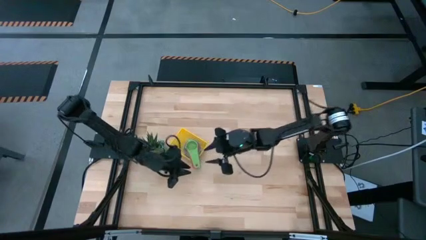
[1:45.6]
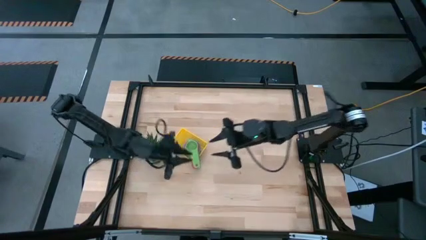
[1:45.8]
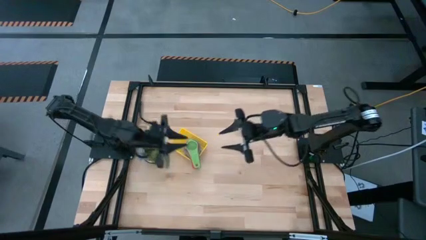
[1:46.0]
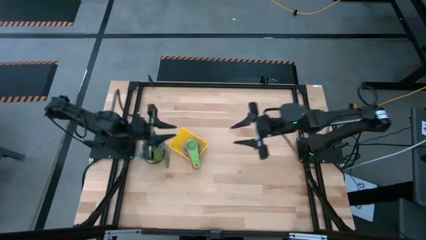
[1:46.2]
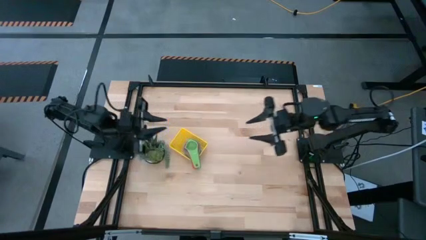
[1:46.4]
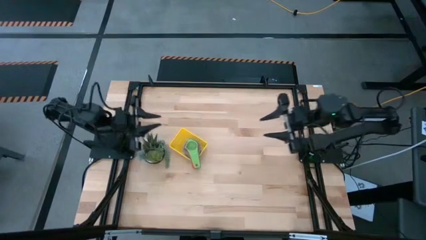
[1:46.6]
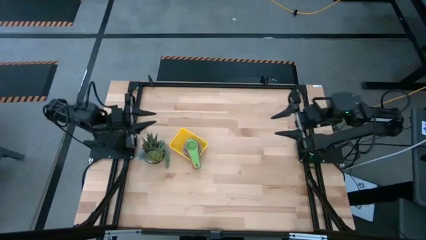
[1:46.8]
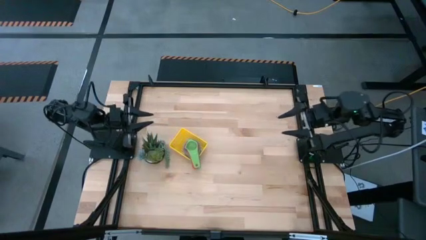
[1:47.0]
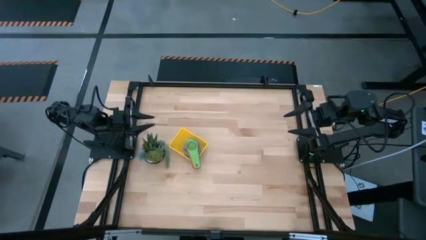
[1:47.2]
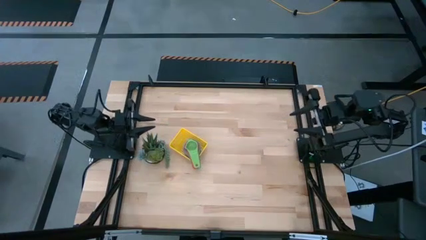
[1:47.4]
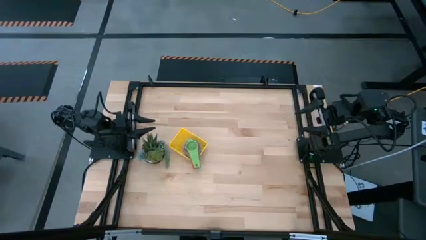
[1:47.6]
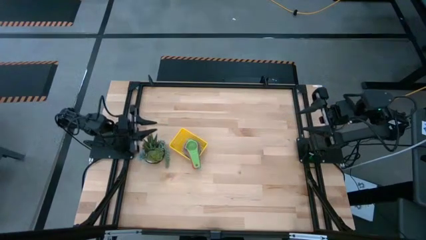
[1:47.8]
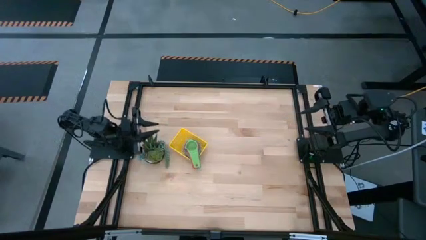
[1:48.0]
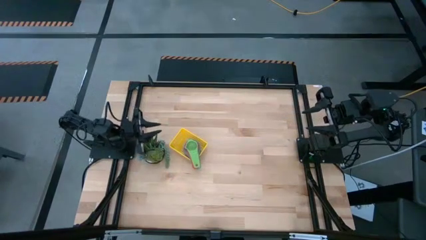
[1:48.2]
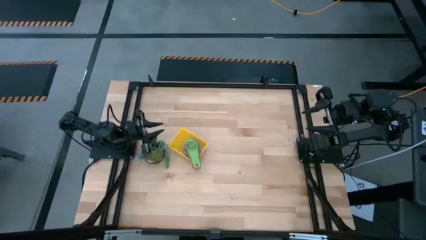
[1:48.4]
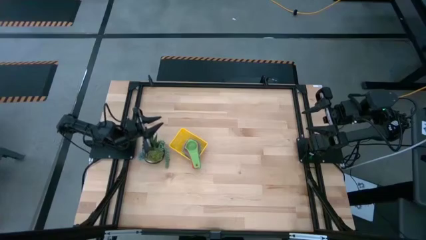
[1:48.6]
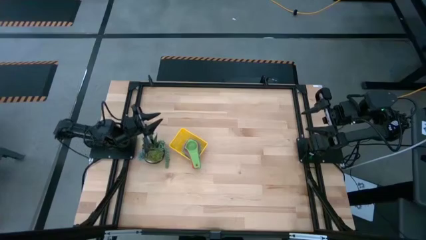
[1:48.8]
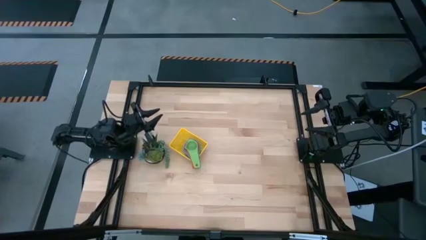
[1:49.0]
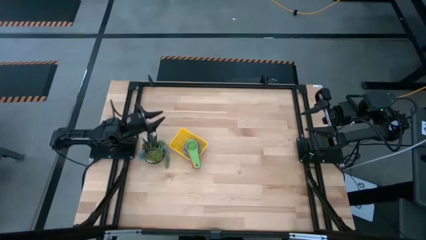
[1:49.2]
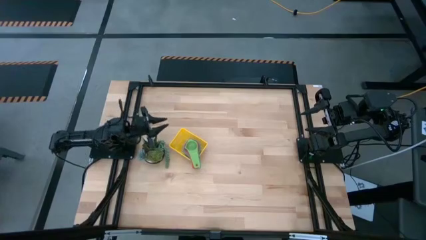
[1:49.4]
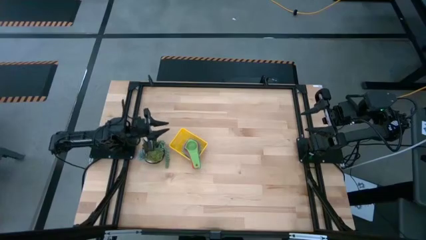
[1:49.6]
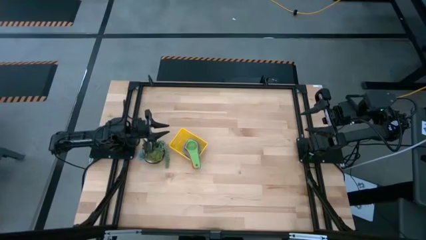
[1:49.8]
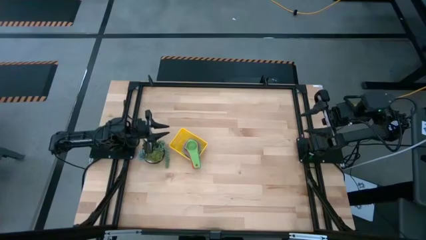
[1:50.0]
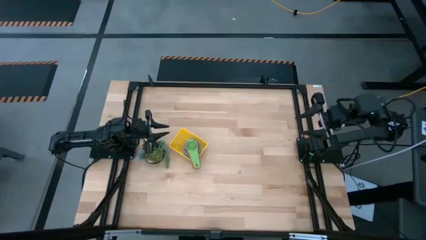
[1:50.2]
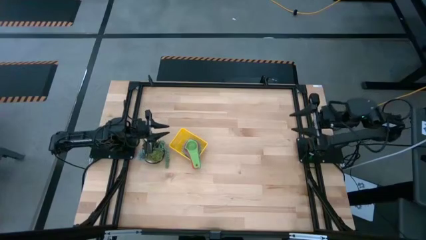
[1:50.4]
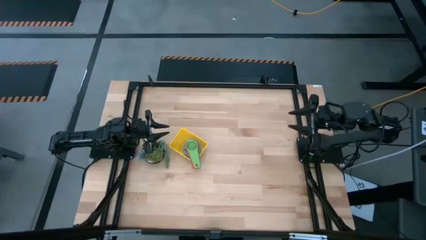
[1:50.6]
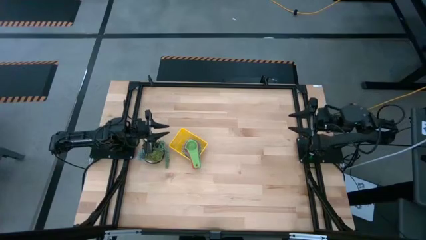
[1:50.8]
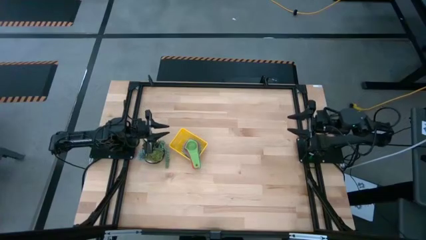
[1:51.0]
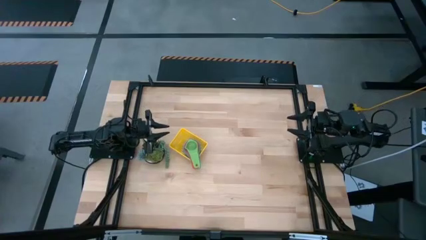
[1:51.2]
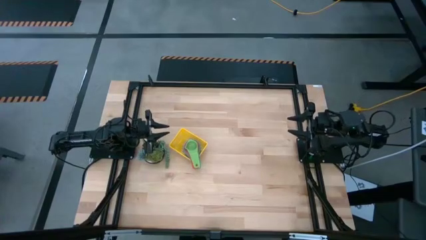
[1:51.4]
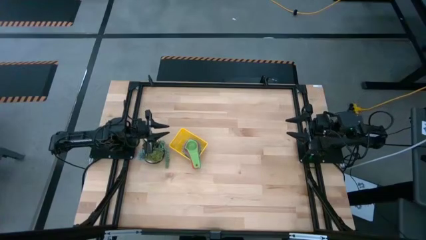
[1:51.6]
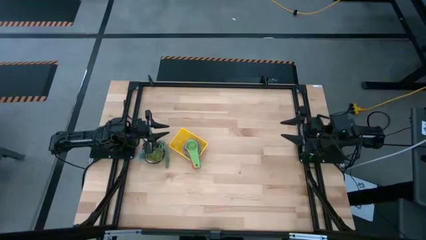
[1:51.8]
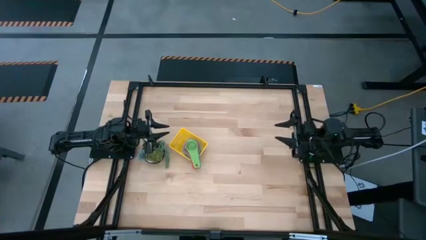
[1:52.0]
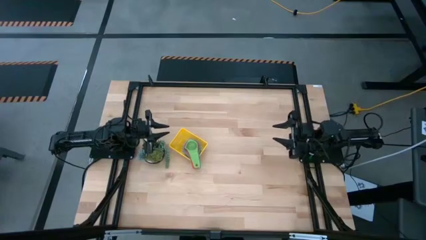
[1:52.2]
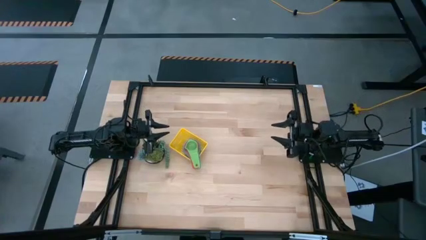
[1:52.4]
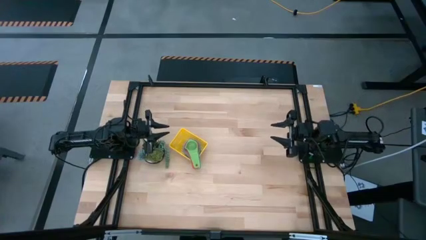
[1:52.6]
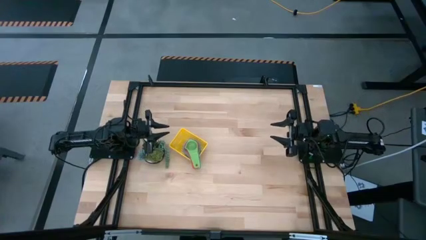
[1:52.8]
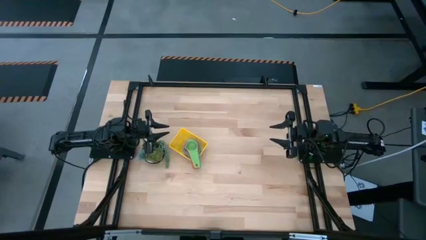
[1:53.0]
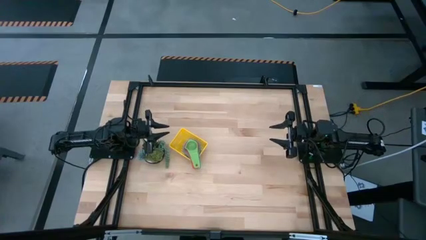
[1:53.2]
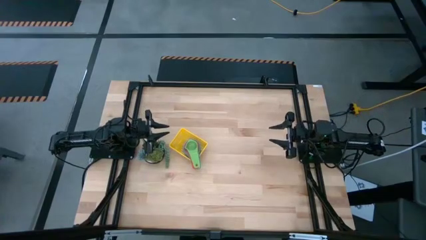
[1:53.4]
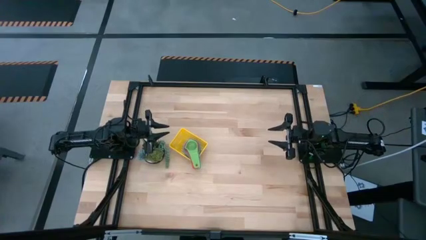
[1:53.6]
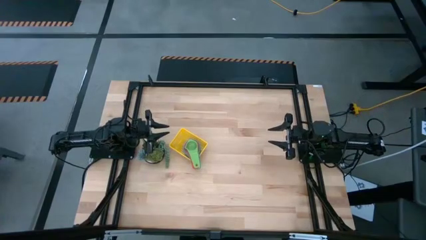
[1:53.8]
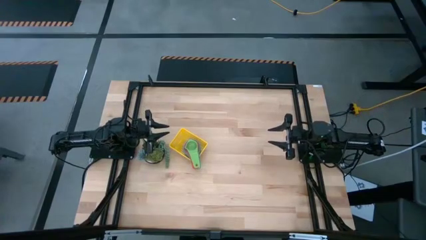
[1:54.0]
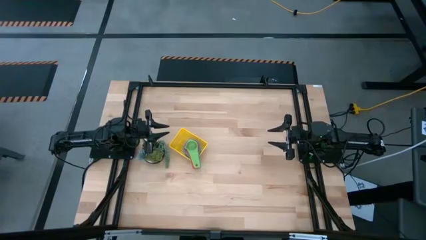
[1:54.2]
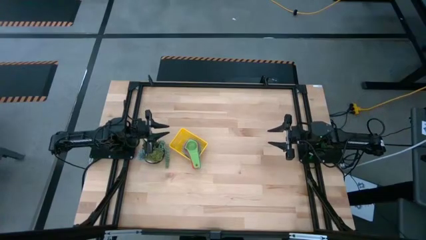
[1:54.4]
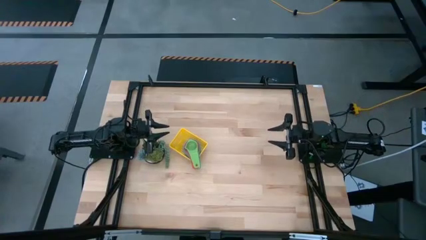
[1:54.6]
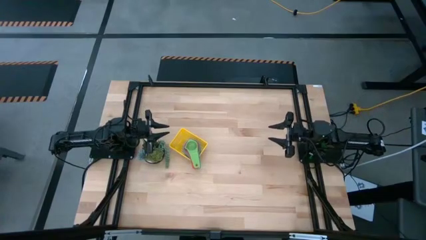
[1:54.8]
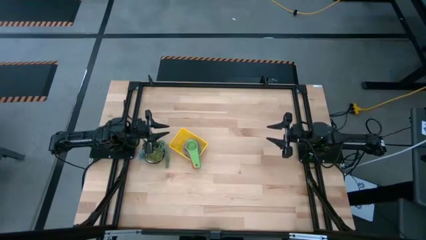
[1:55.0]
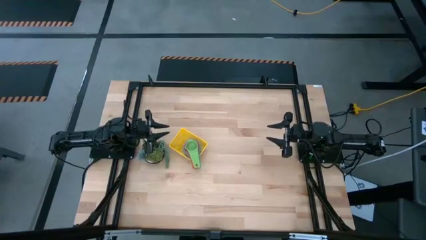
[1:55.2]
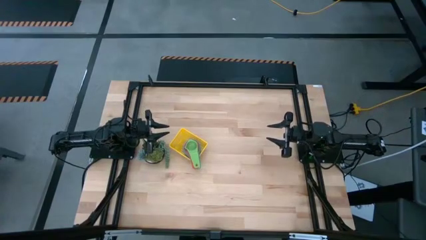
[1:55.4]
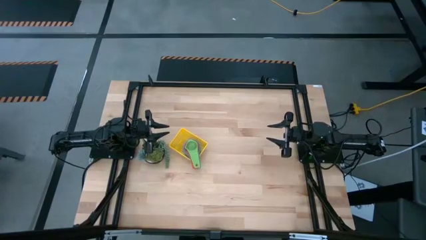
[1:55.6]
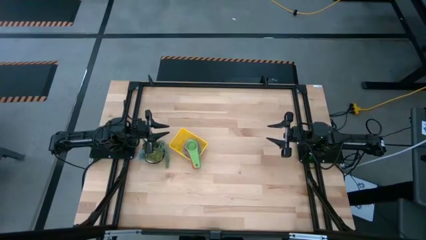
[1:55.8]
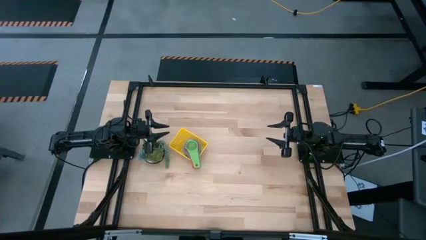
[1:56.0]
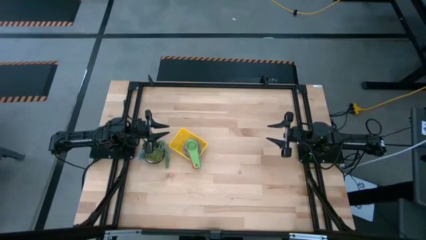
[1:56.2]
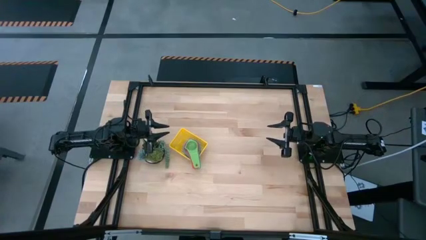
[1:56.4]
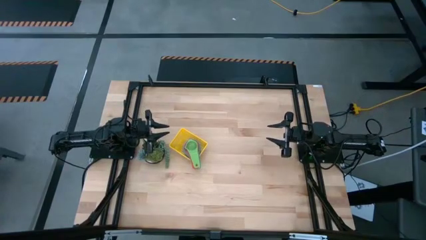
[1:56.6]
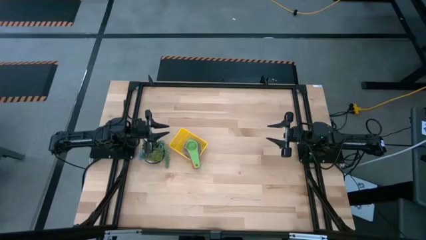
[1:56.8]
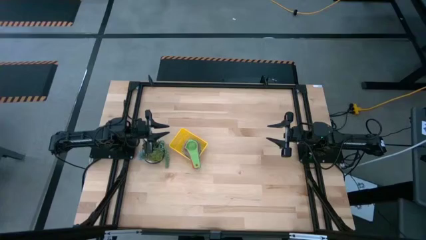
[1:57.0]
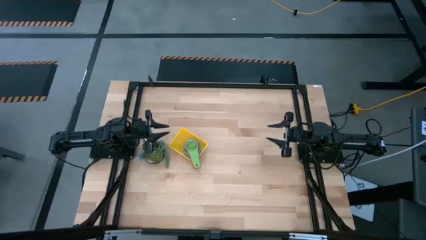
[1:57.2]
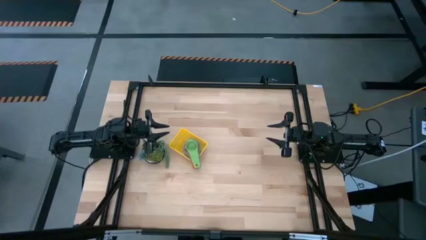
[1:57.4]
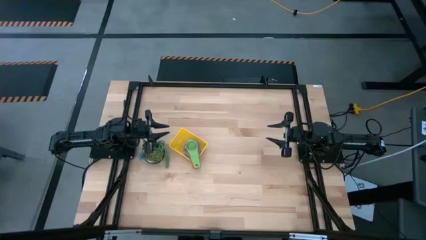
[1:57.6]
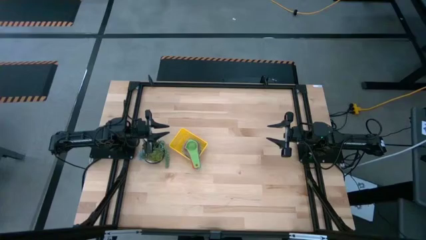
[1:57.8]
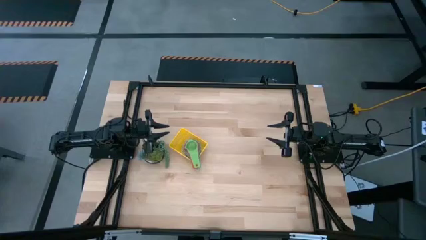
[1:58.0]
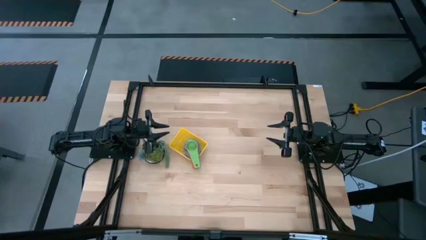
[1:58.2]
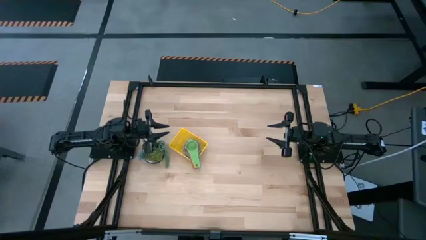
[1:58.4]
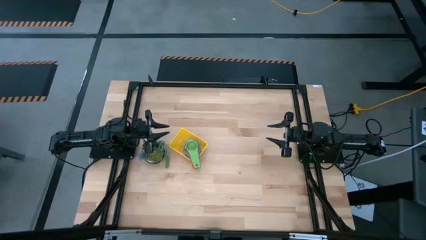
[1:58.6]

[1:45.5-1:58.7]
Task: Nest measuring cups in basket
Return to Home Position

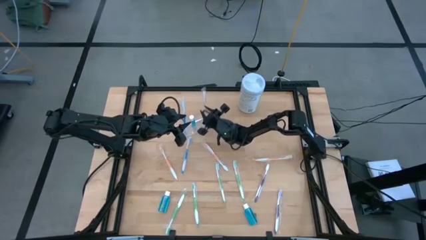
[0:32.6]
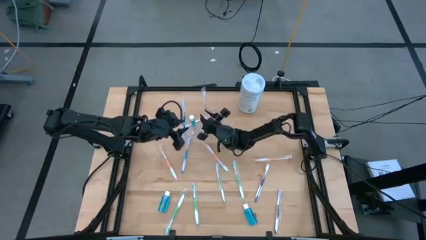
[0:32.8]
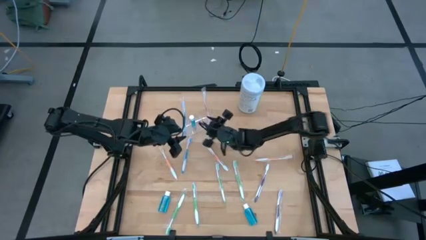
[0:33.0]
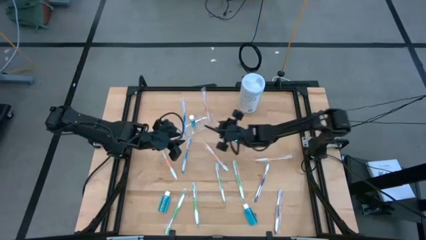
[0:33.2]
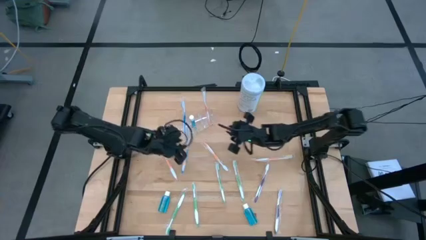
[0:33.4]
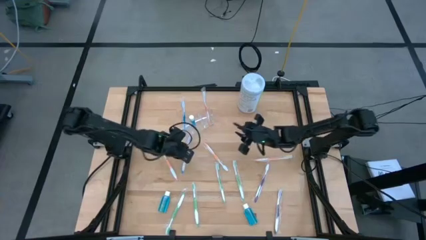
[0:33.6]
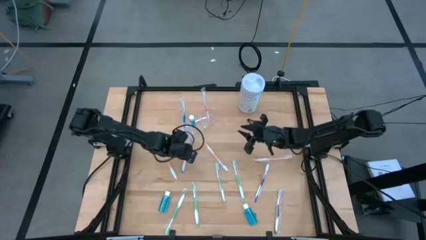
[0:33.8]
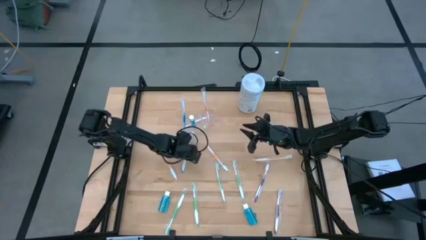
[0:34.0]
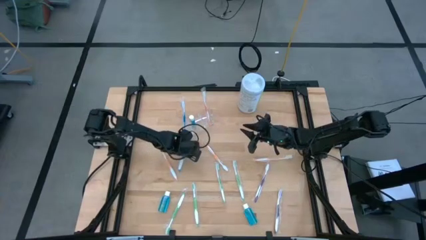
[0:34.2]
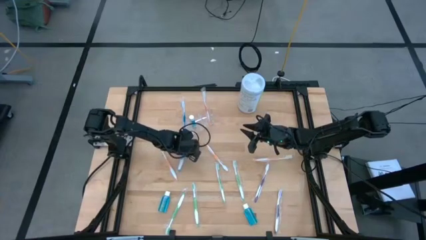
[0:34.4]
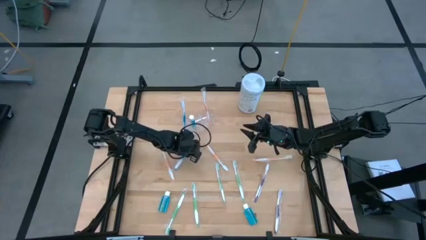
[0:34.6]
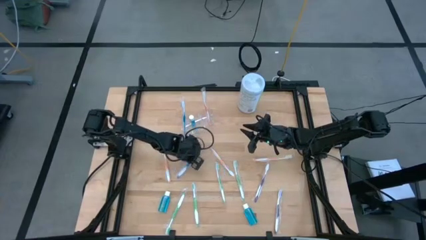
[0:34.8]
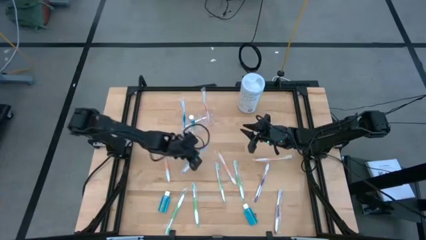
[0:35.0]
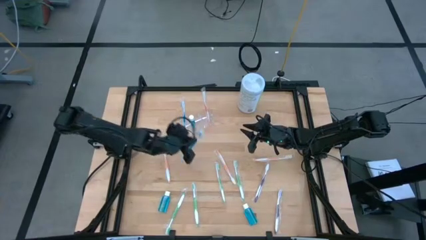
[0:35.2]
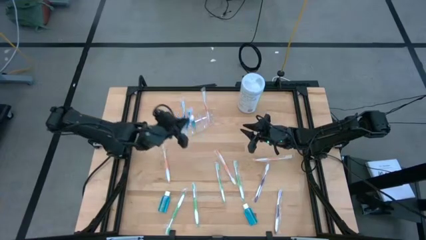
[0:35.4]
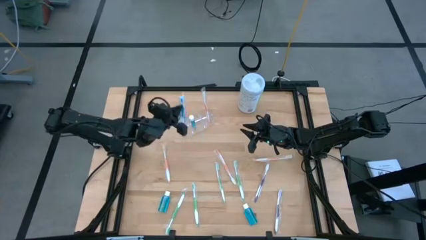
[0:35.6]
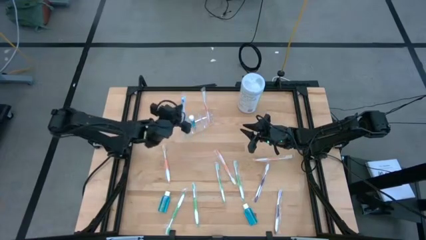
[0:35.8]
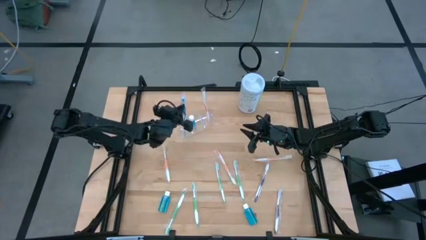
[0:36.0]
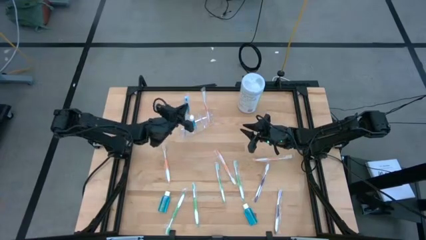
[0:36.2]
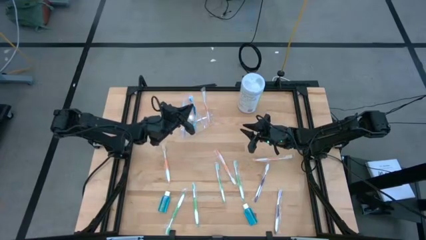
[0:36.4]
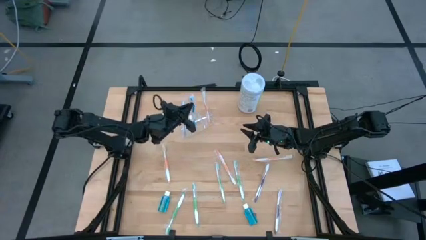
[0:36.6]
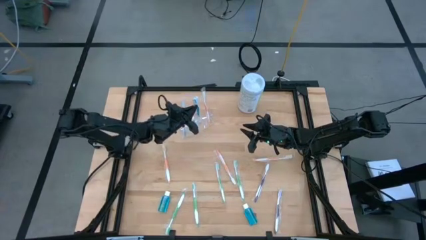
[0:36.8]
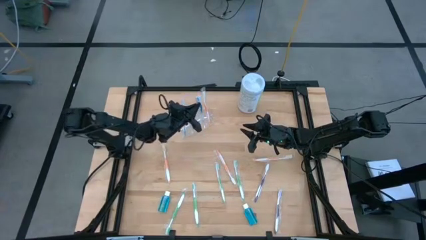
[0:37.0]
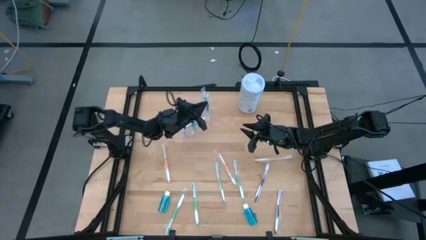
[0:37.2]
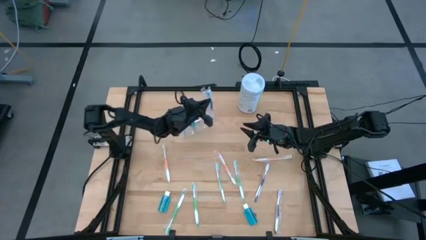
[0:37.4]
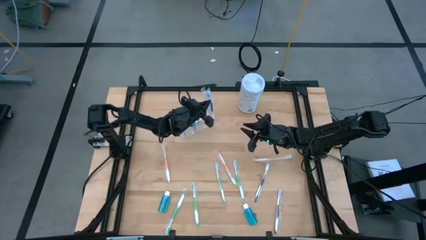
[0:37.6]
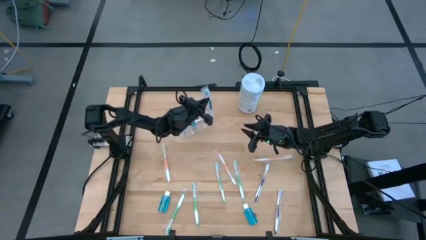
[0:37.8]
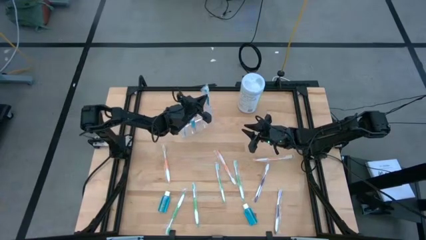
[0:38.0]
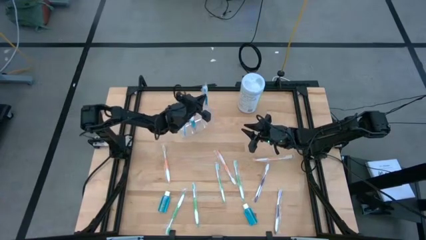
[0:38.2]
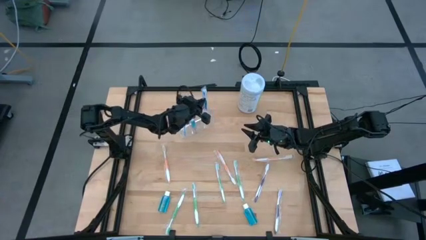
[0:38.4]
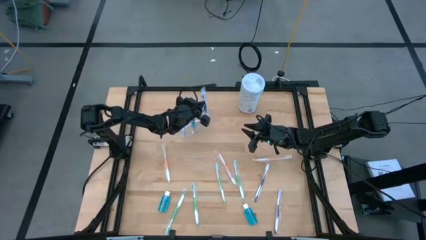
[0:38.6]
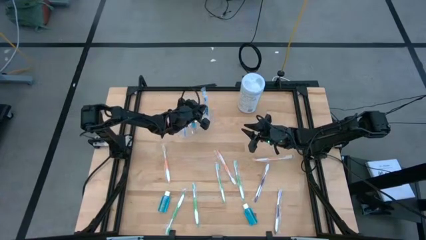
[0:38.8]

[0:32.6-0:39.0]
Task: Pick & Place toothbrushing station
Put the blue toothbrush into the transparent organizer
